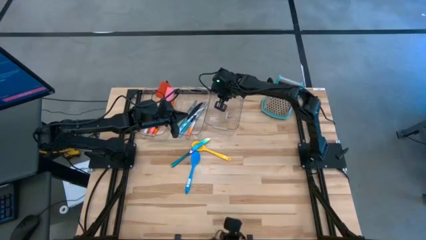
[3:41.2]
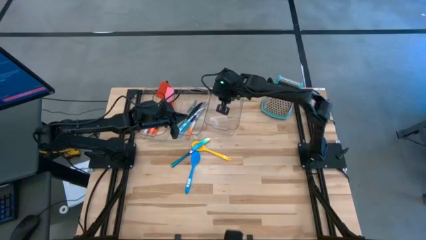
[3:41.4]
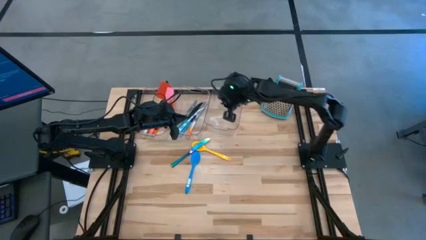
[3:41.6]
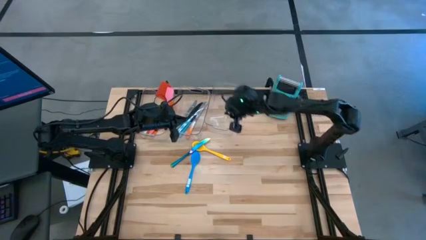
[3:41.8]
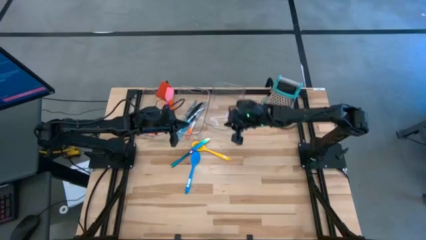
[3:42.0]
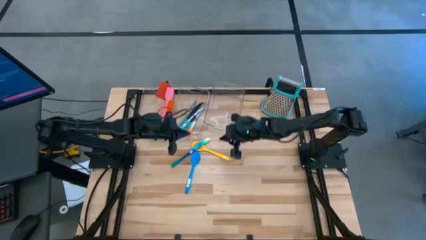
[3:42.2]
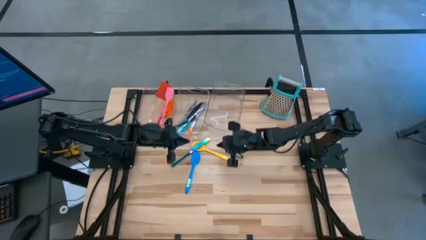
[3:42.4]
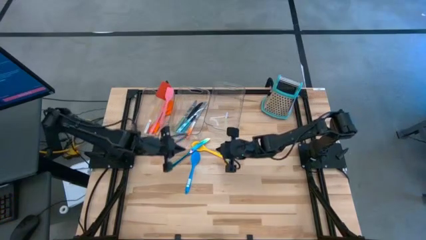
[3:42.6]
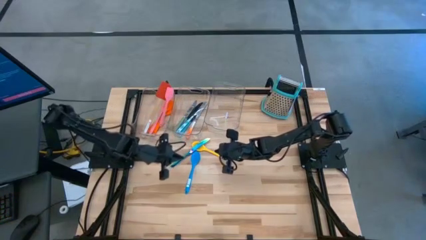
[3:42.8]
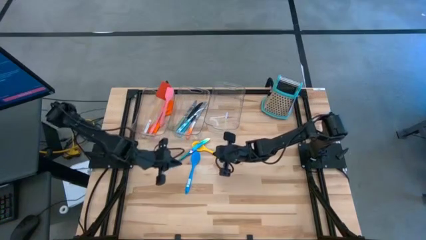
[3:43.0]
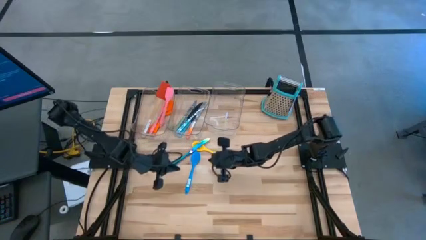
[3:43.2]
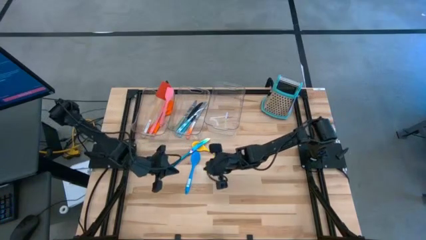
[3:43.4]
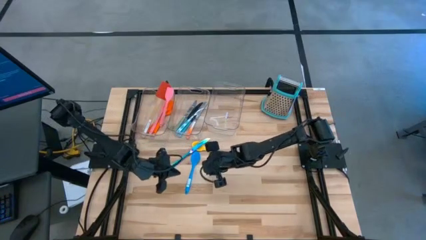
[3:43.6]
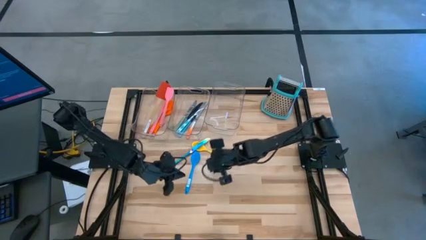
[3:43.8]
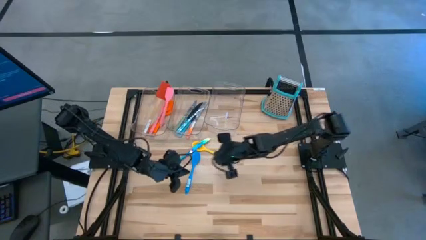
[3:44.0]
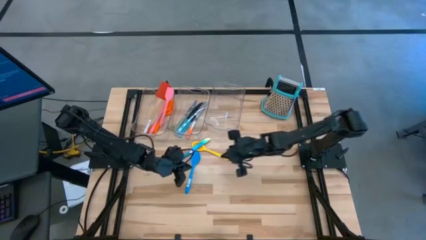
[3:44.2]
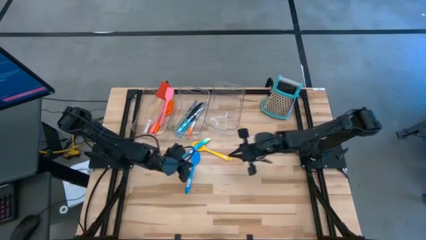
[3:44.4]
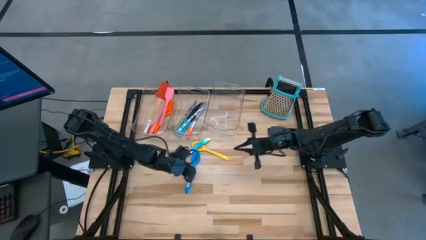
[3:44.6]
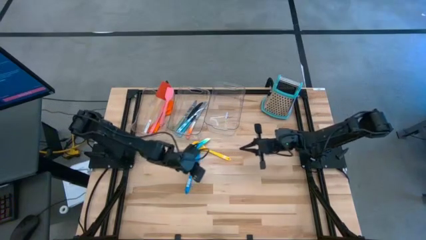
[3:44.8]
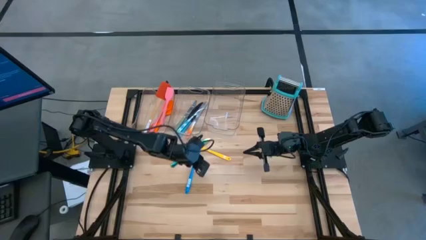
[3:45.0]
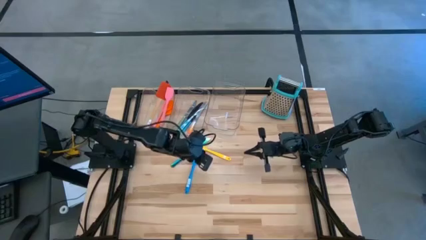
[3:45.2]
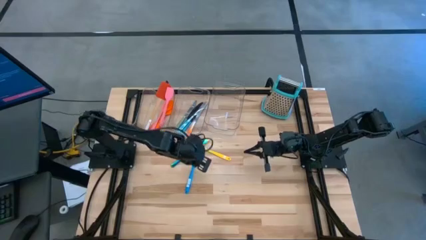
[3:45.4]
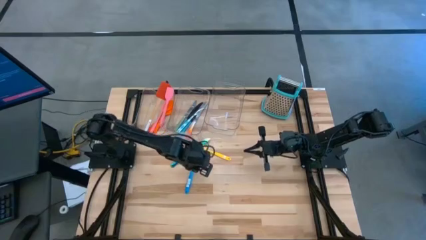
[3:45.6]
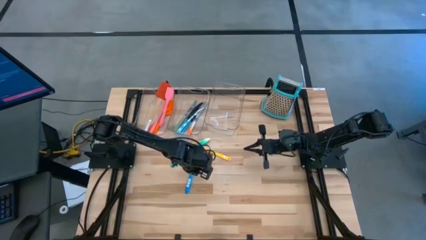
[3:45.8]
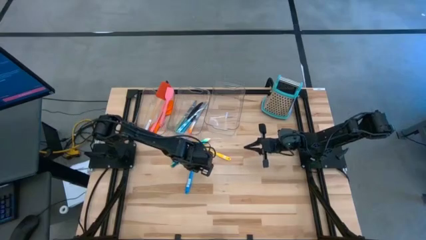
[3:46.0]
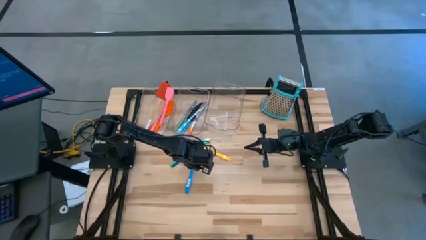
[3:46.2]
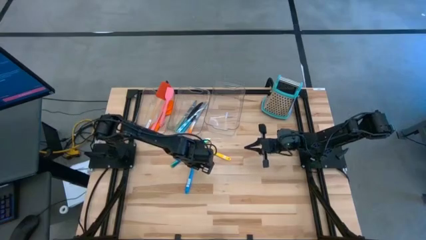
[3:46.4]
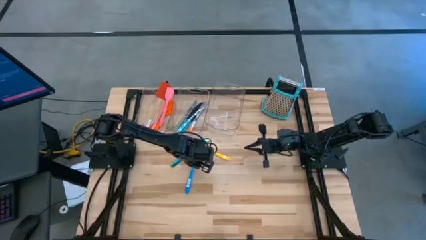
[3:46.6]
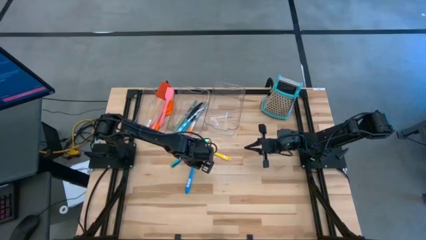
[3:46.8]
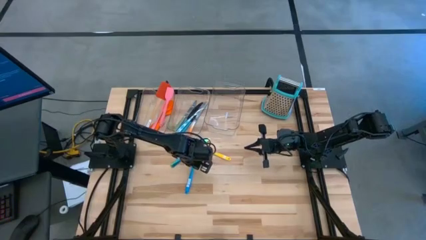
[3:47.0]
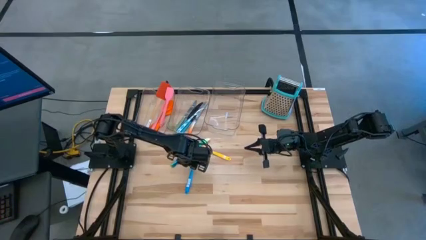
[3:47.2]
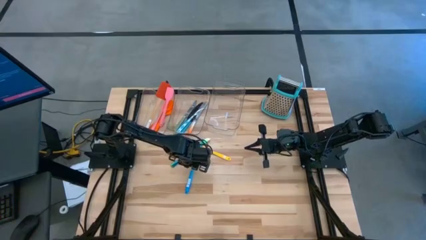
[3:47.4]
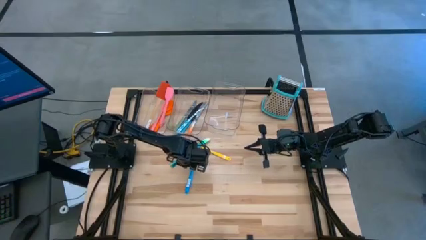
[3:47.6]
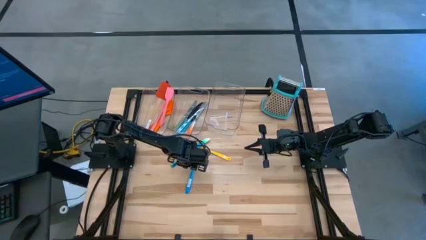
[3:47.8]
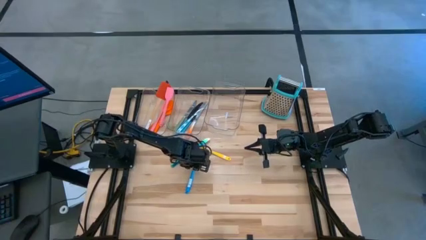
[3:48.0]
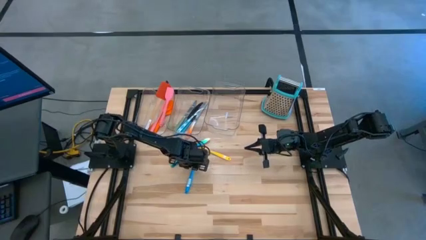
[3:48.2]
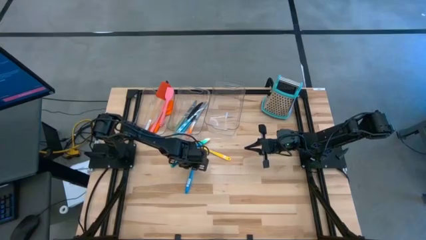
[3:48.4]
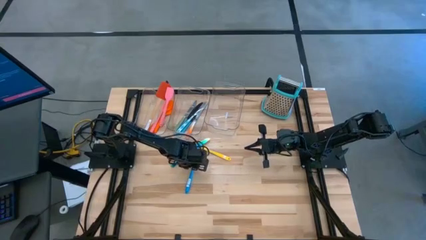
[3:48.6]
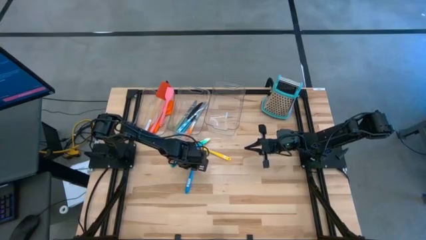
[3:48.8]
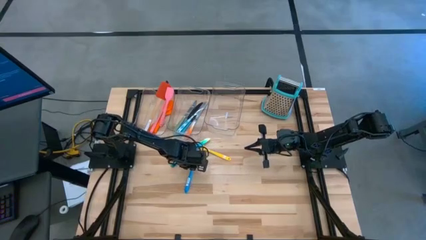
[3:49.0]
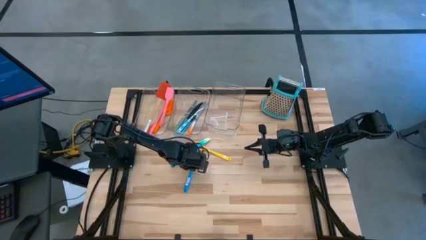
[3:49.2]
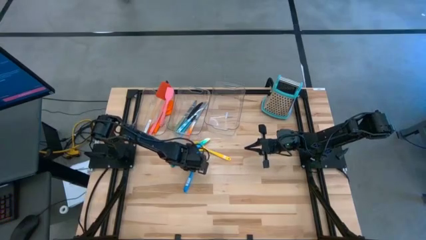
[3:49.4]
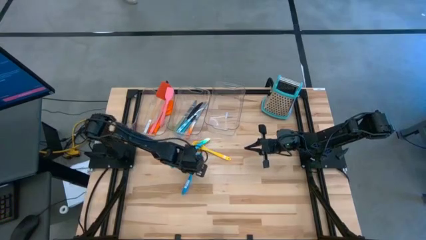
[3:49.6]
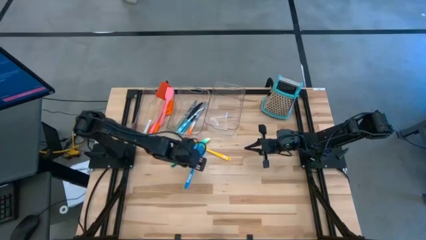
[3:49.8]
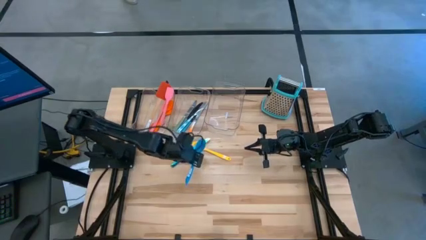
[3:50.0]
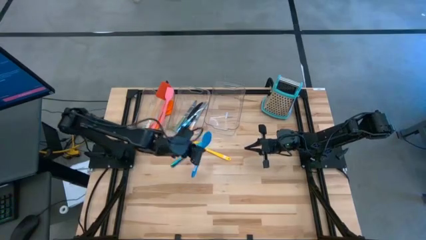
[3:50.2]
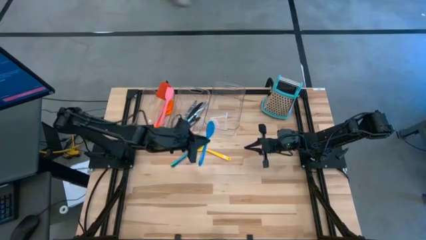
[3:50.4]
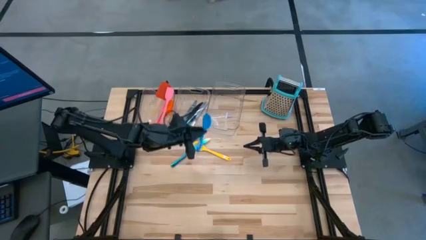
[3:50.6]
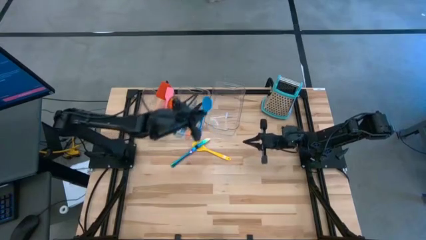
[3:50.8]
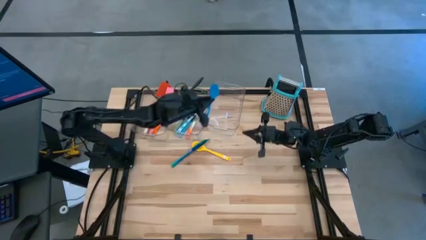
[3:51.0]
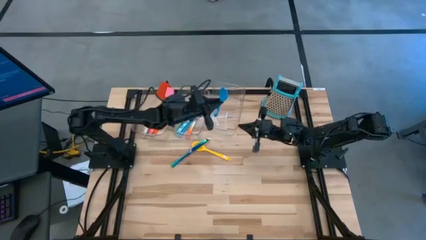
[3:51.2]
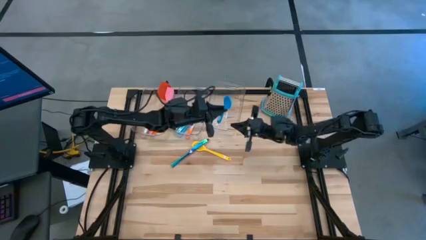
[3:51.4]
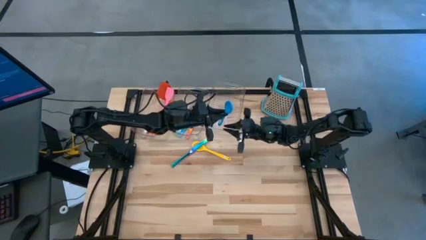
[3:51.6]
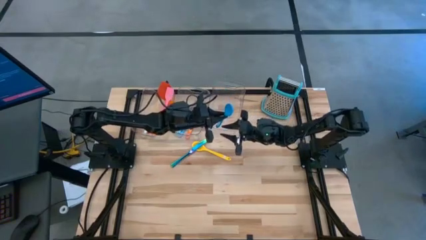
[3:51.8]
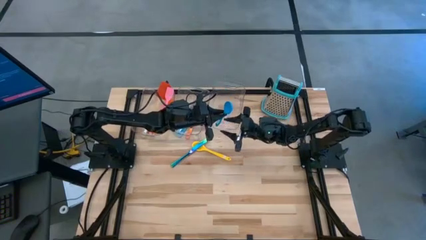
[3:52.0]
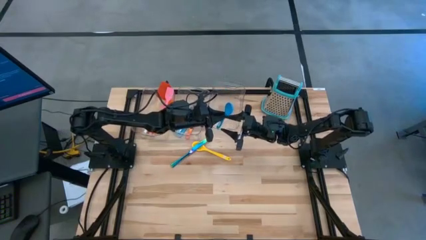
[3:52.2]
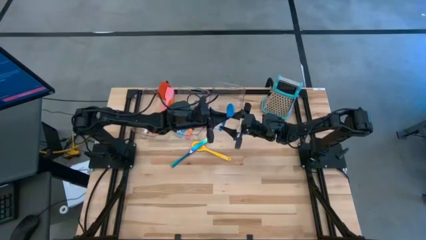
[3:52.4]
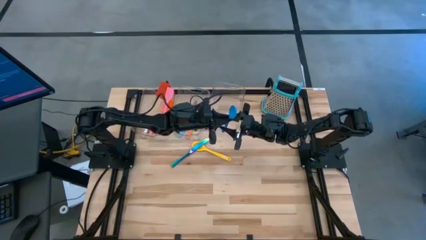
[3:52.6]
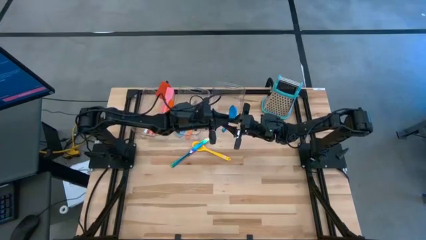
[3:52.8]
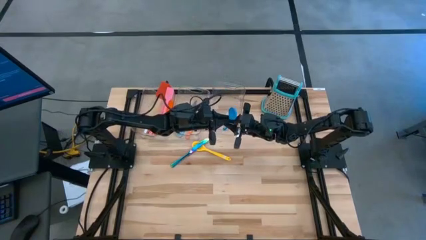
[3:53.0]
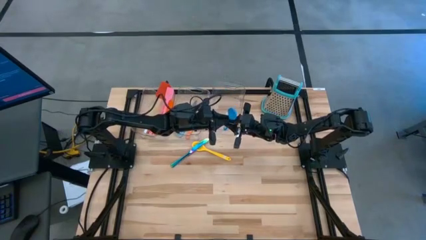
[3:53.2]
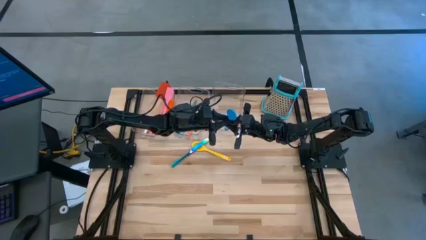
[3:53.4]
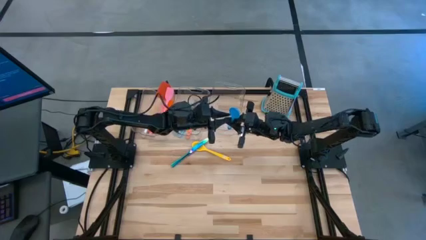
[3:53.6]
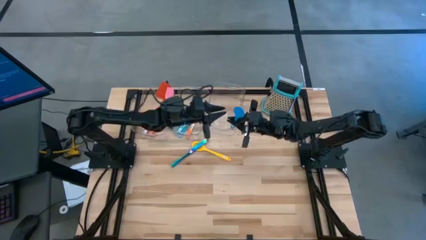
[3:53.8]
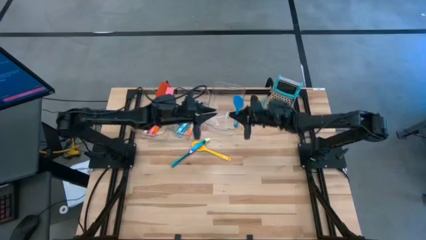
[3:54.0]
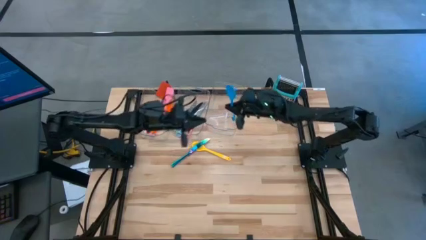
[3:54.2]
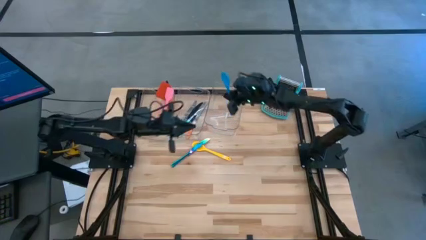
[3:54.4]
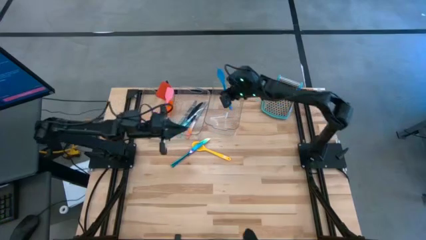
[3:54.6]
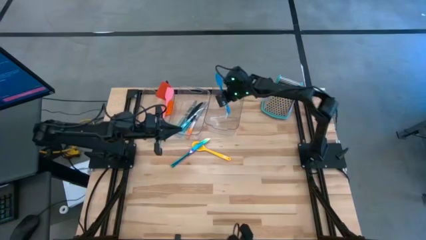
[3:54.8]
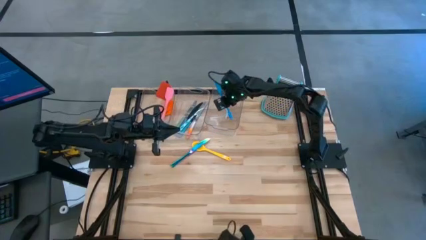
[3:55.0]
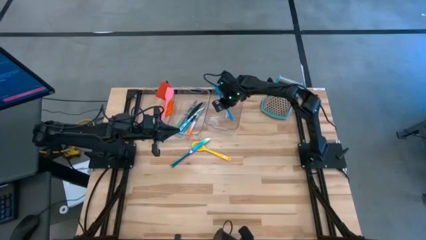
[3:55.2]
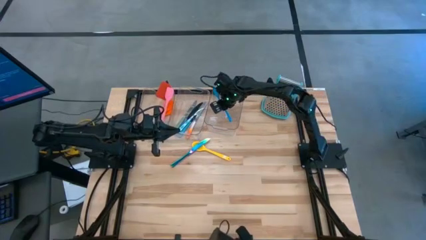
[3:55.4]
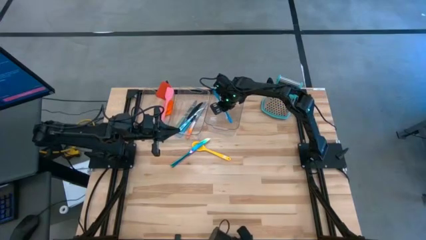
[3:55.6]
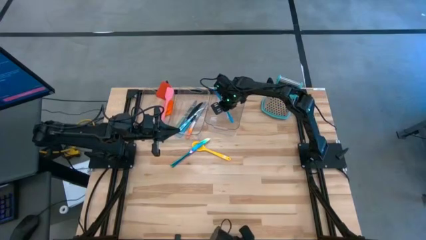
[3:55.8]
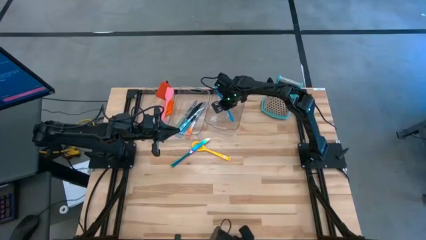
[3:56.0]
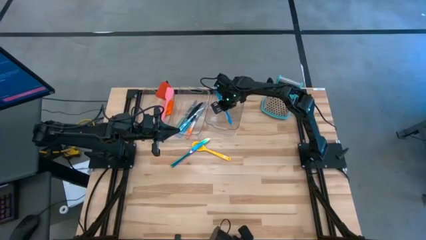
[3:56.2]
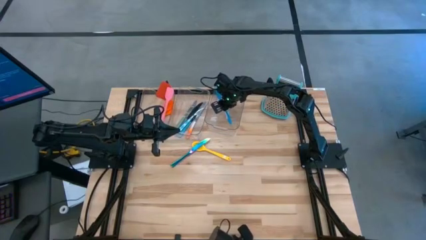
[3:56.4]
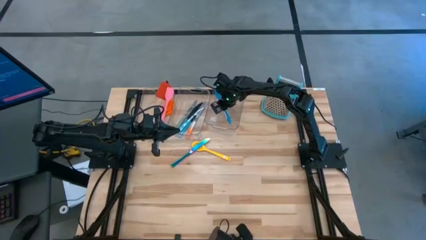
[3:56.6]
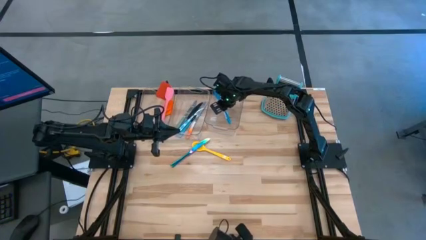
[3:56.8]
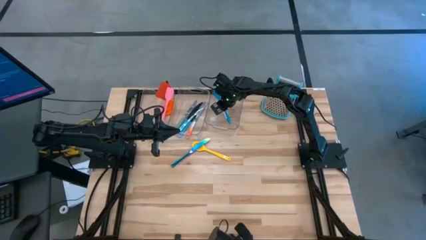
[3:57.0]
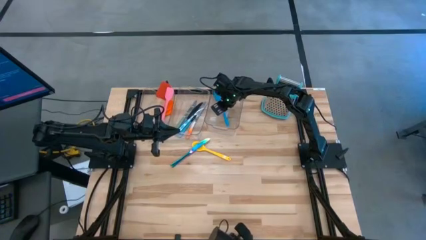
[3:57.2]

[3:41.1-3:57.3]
Task: Pick & Place Kitchen Items
Put the blue serving spoon into the right transparent bin
